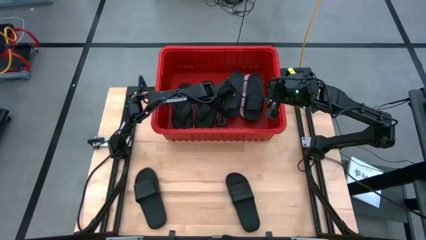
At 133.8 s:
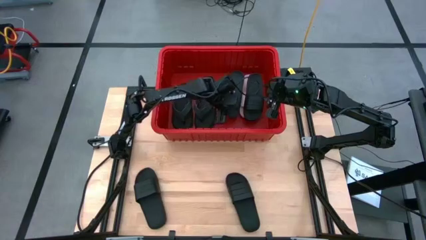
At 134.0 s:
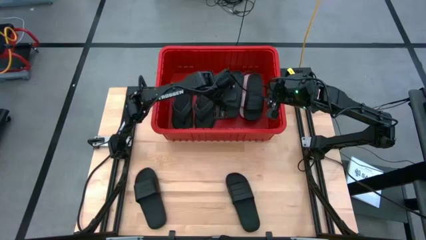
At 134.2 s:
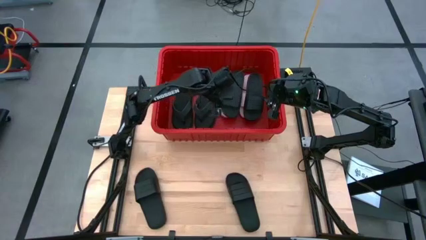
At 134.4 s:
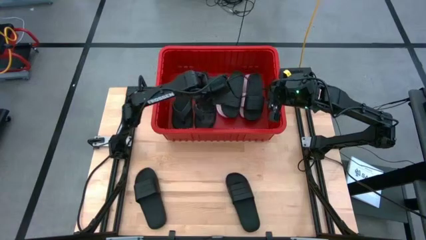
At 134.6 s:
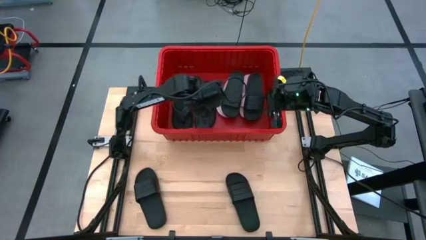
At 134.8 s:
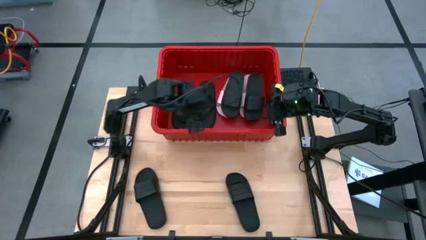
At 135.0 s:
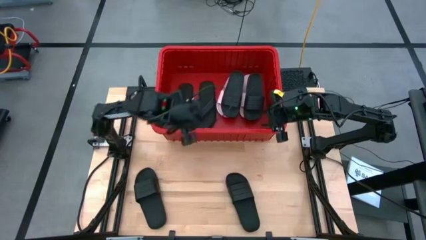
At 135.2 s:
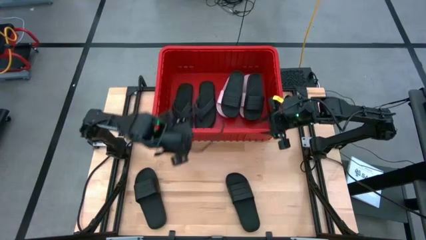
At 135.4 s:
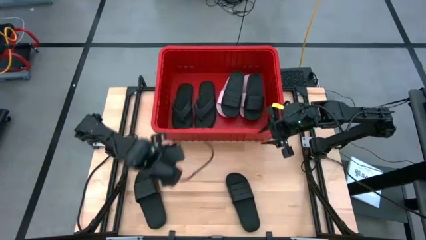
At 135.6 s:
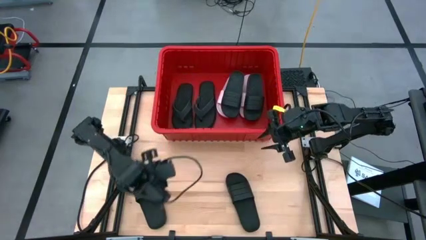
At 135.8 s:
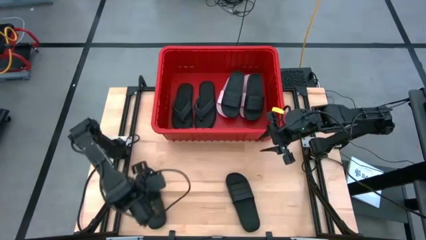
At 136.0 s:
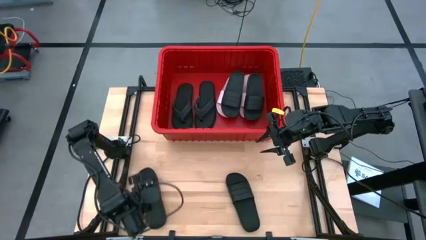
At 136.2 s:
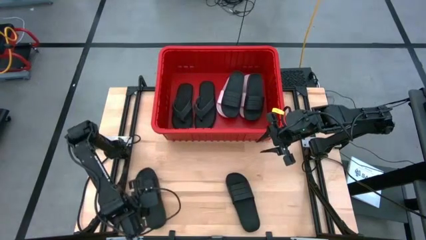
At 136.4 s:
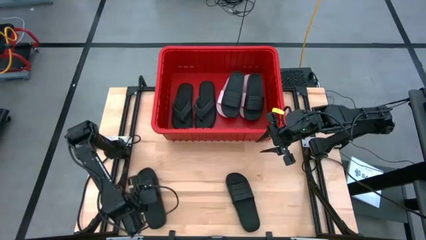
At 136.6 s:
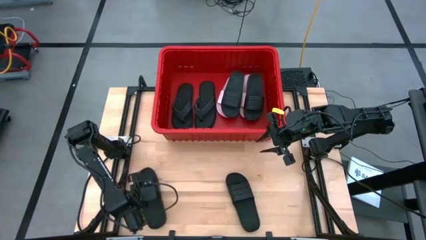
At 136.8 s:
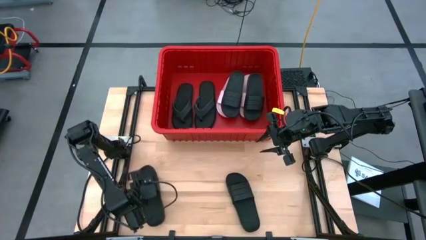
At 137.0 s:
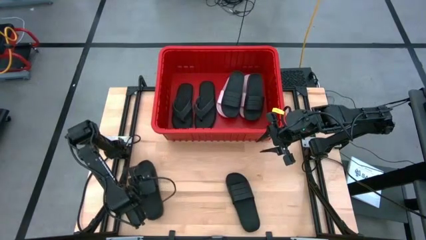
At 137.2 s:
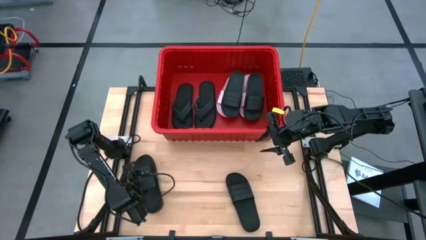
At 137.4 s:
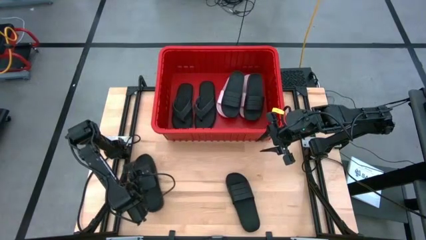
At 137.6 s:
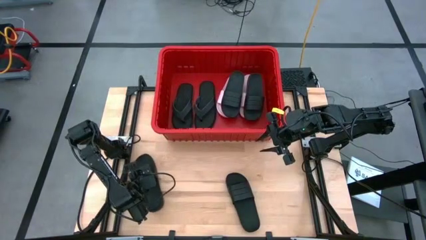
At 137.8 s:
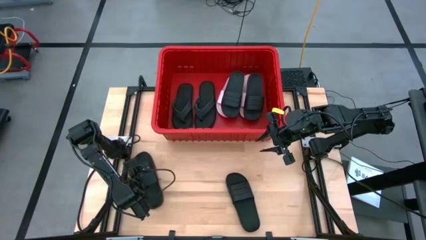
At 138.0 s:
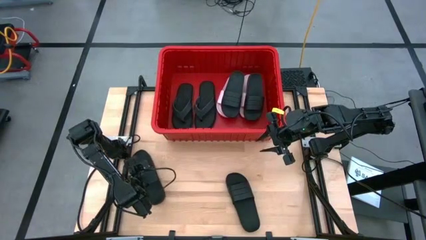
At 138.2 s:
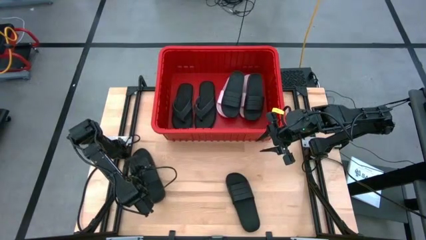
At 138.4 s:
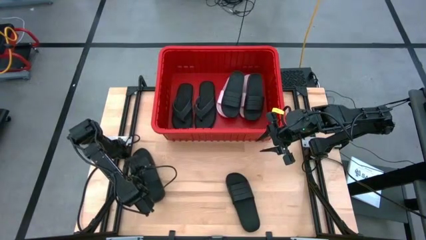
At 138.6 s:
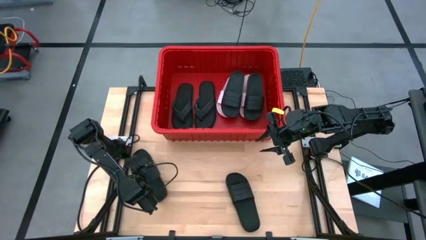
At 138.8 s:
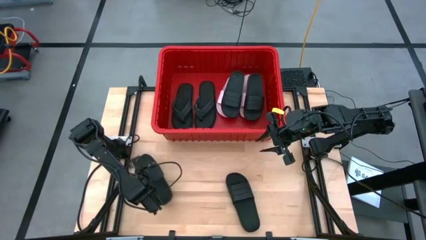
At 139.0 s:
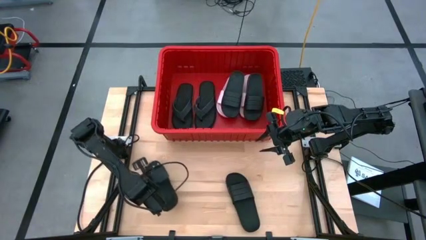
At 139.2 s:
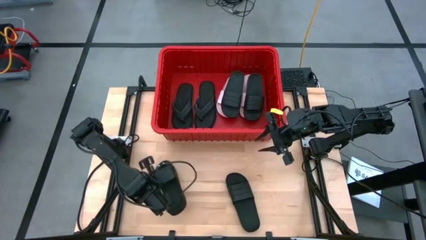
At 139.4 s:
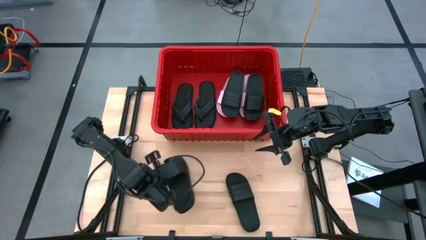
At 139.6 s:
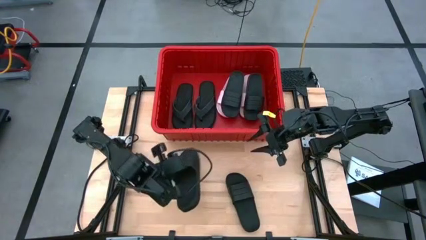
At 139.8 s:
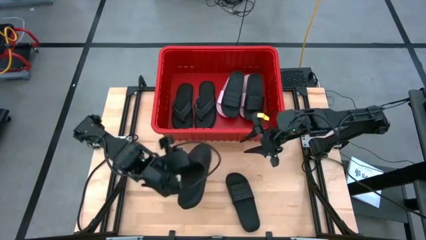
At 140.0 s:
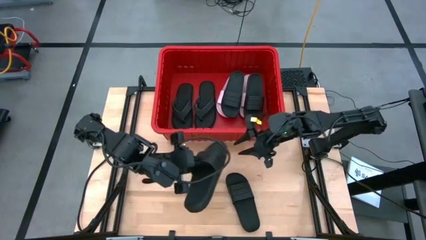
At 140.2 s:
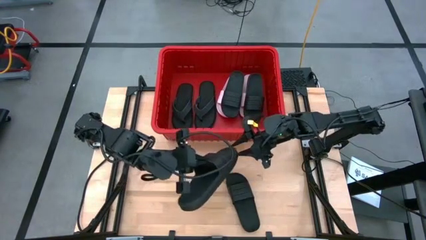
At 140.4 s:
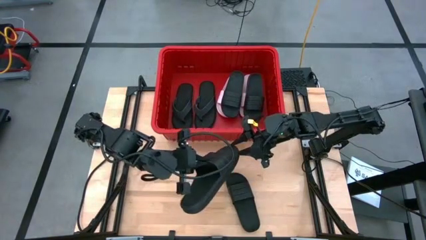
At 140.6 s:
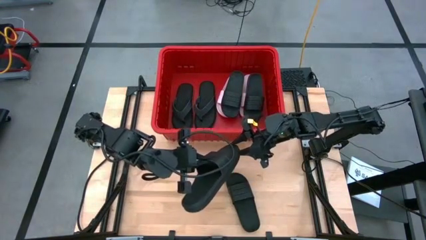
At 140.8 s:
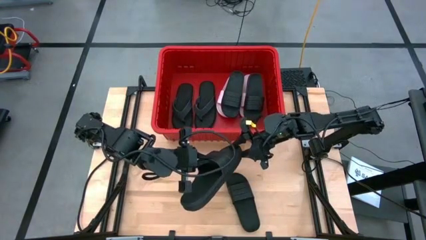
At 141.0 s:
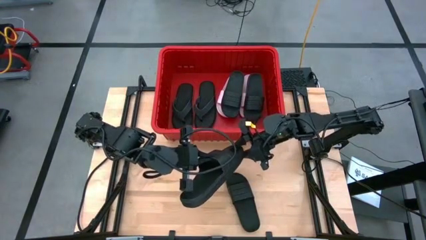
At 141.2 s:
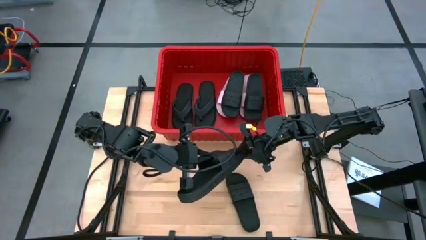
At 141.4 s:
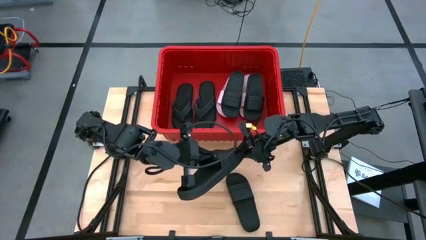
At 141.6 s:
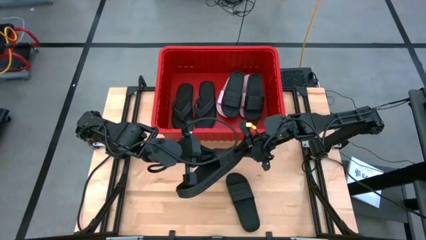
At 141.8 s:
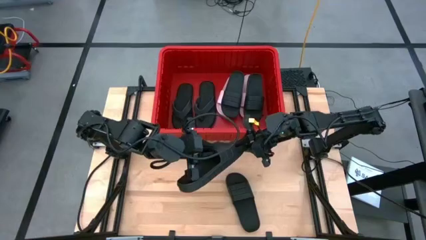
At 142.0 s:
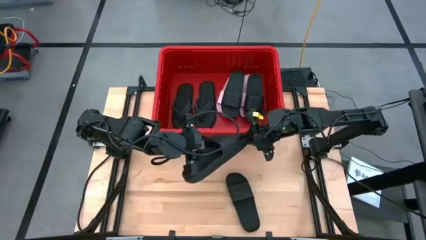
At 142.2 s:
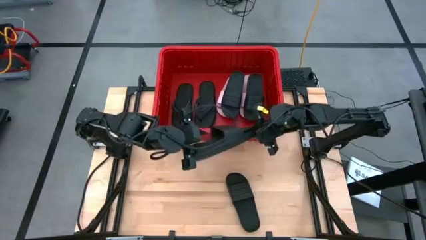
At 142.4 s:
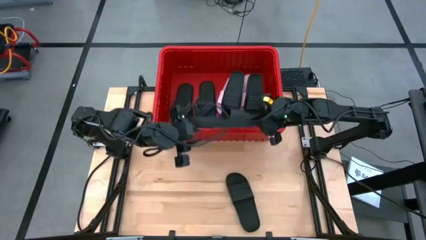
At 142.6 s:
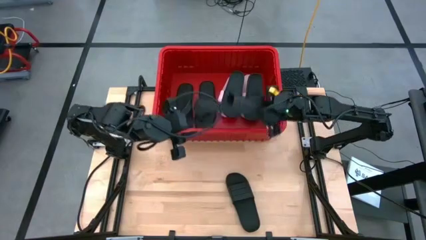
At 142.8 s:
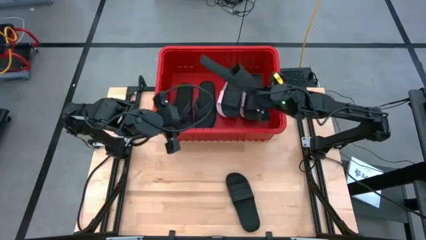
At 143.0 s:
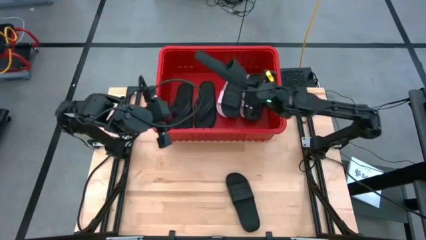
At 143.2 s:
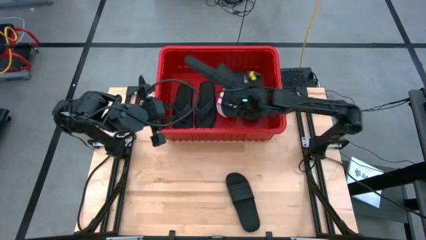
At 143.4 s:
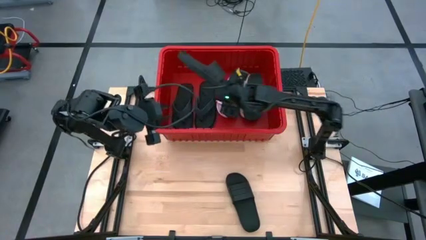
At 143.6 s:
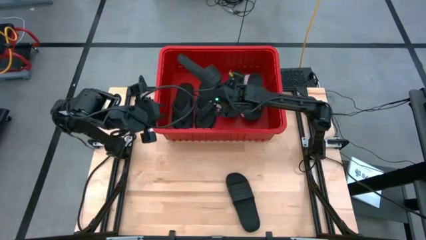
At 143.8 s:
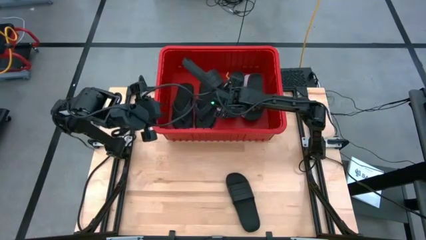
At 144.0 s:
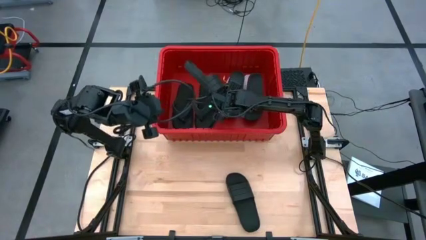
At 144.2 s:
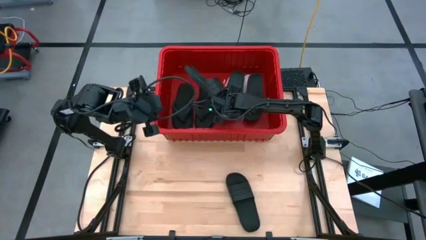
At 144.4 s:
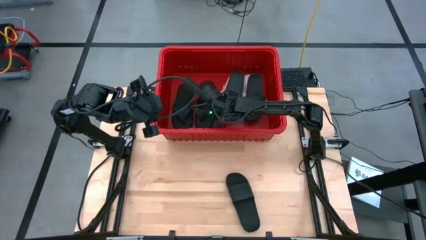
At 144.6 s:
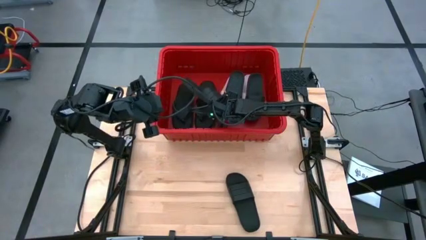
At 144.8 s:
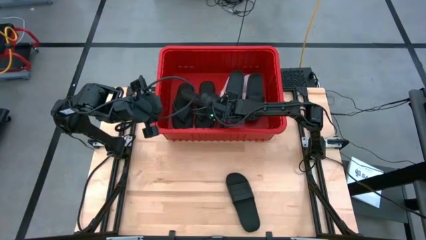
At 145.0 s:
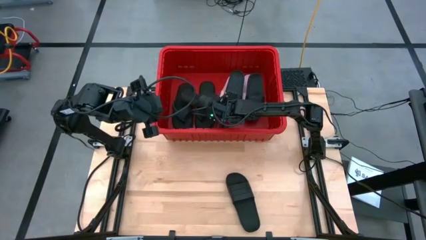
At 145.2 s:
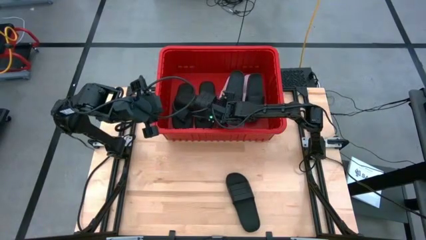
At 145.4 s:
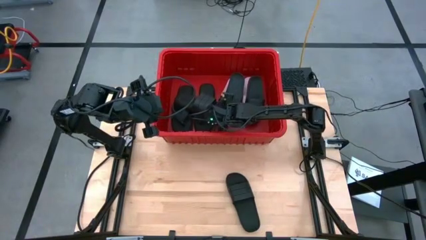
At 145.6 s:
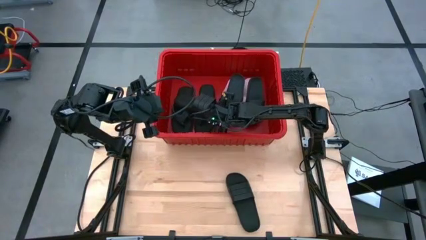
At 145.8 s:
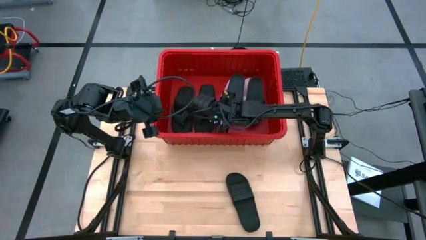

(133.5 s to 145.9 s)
Task: Pick and place slides into bin
Put the black slide into the red bin

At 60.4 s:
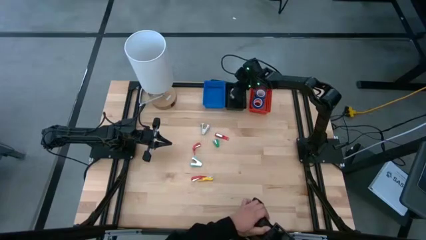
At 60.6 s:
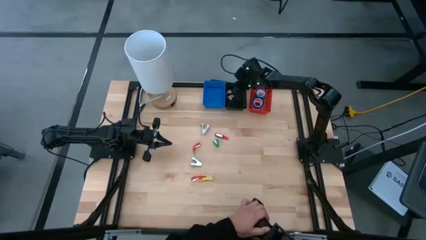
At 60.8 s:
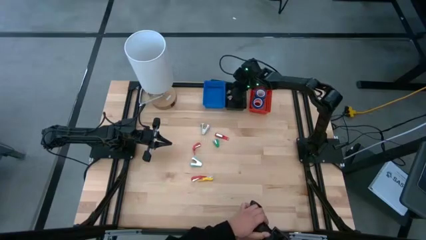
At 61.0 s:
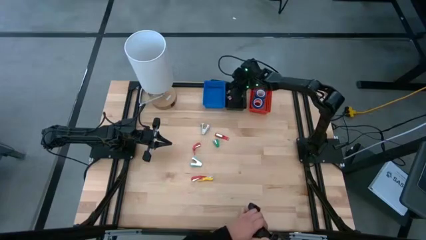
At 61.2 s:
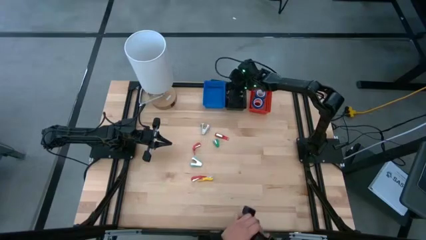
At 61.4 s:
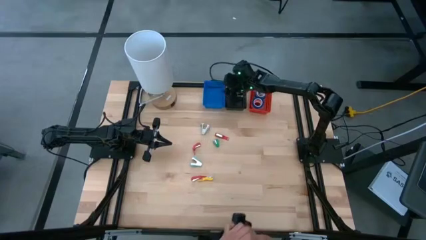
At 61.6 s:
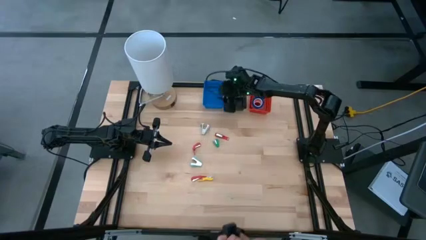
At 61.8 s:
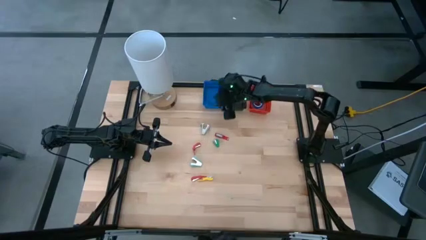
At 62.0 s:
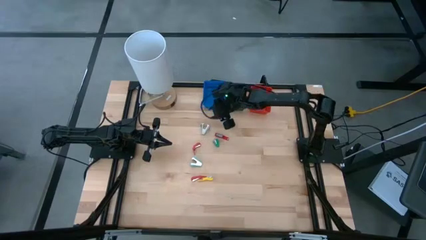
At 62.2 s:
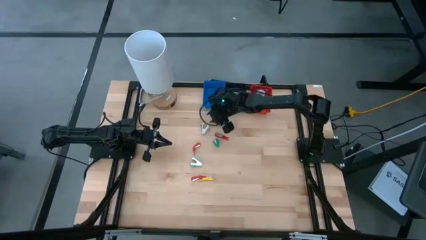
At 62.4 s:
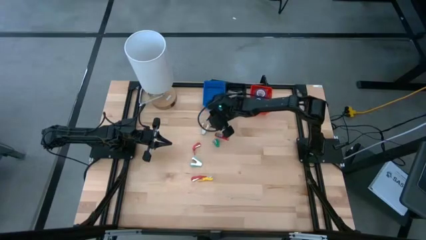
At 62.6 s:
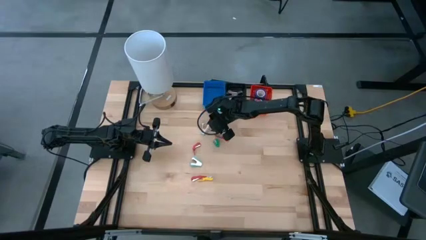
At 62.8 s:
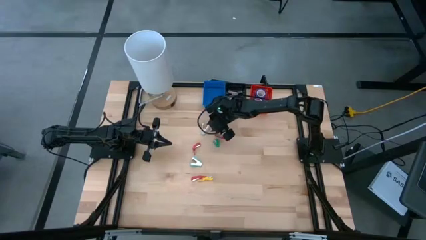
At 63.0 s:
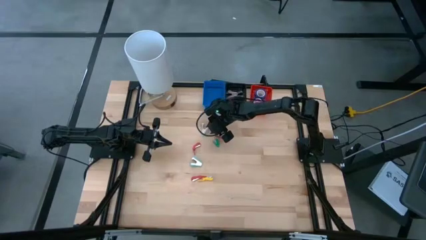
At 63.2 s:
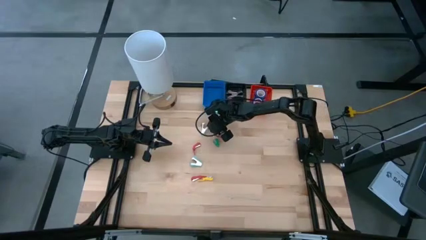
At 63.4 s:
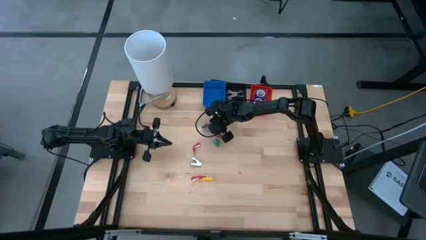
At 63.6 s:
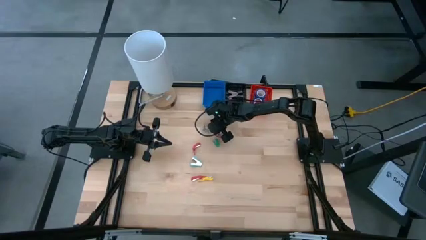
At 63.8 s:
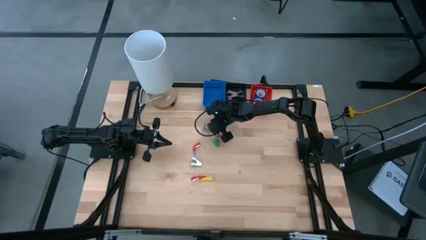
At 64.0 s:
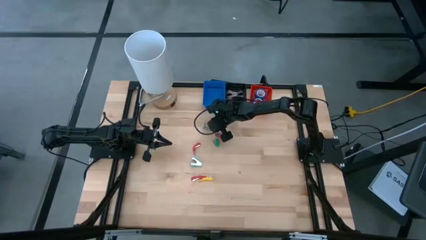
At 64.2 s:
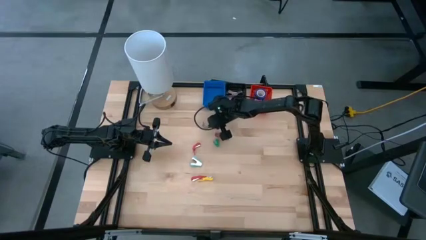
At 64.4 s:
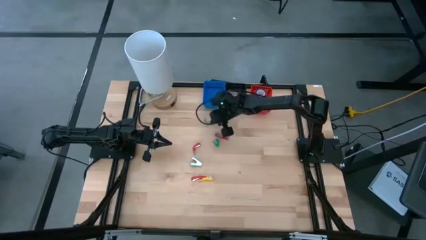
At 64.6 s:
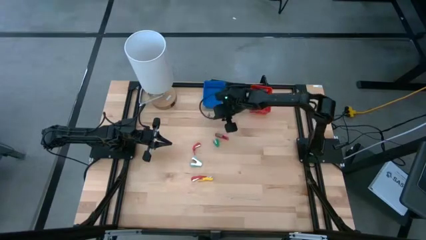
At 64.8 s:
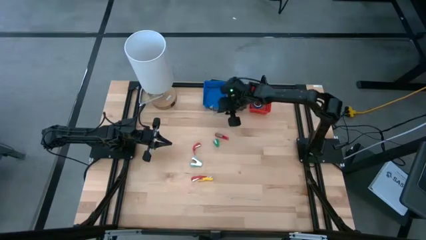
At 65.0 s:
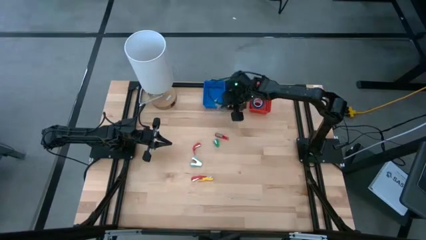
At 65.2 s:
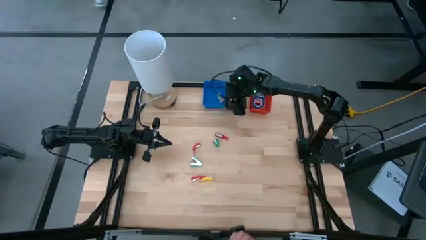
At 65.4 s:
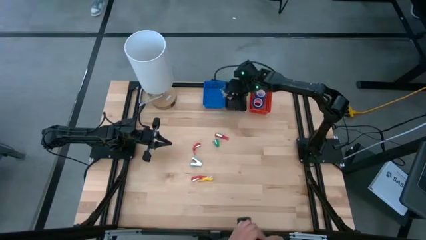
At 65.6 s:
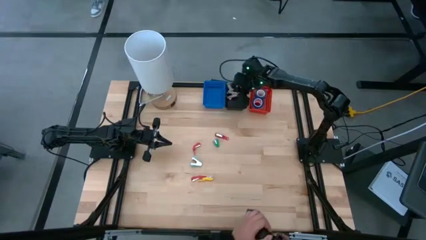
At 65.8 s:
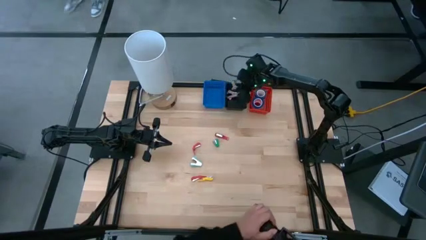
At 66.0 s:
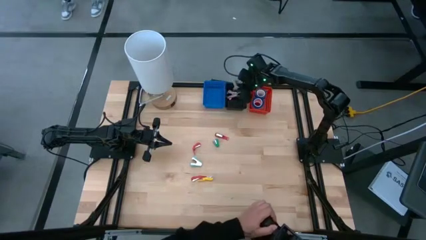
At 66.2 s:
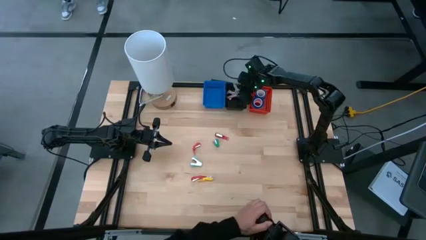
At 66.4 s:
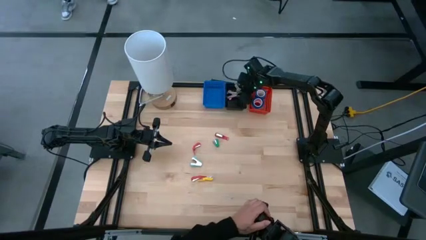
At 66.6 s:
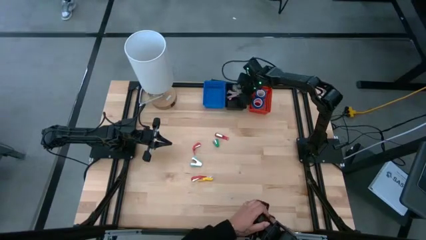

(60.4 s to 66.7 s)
Task: Pick and place Stapler, Stapler remover, tape
Put the gray staple remover into the black bin
